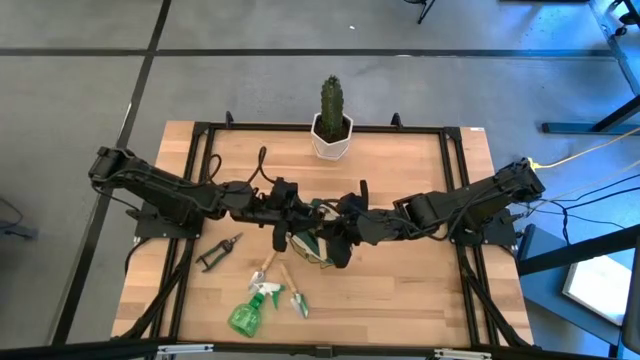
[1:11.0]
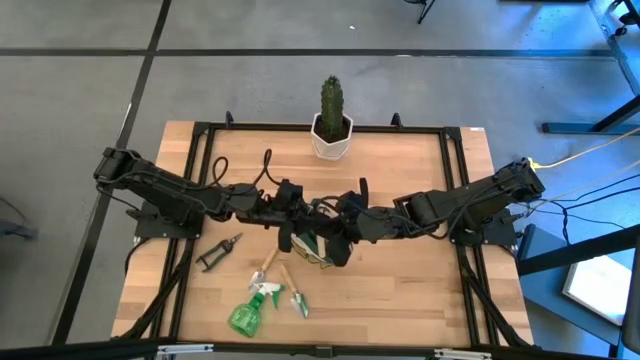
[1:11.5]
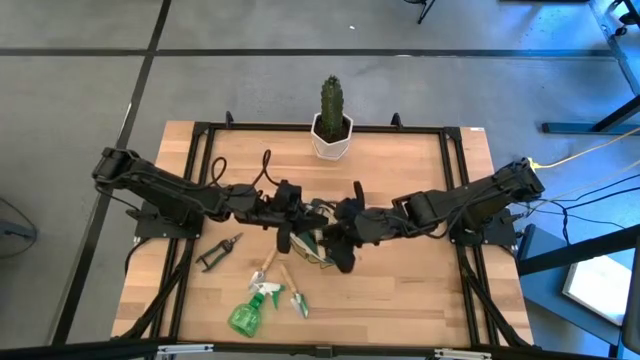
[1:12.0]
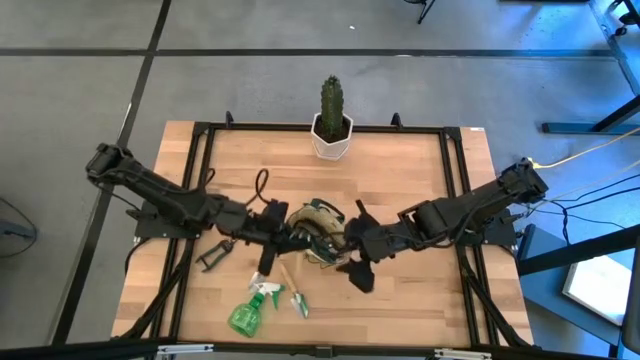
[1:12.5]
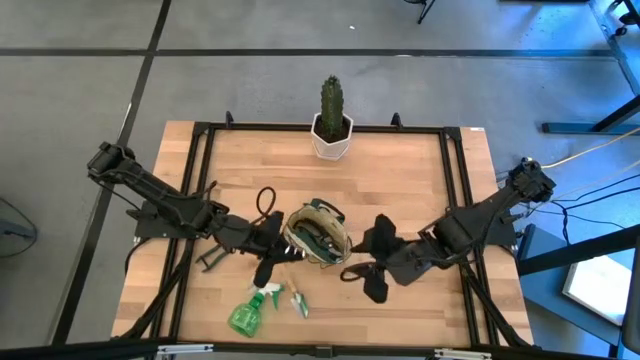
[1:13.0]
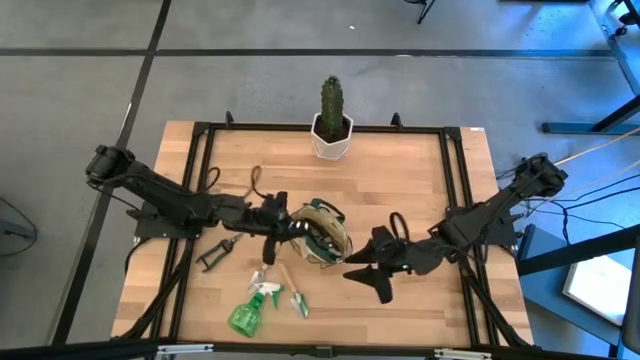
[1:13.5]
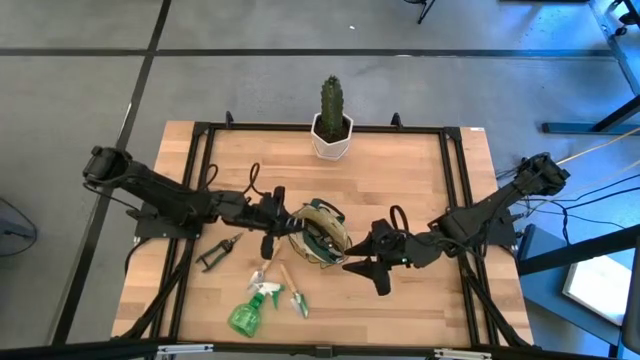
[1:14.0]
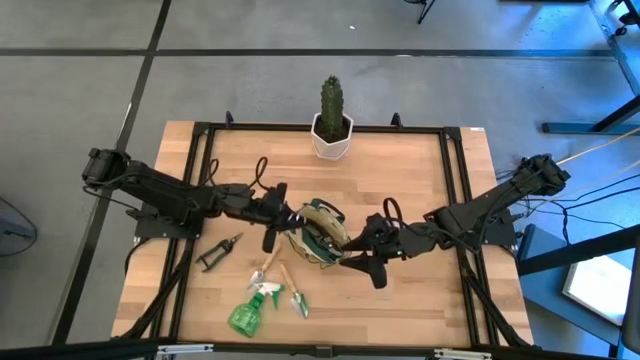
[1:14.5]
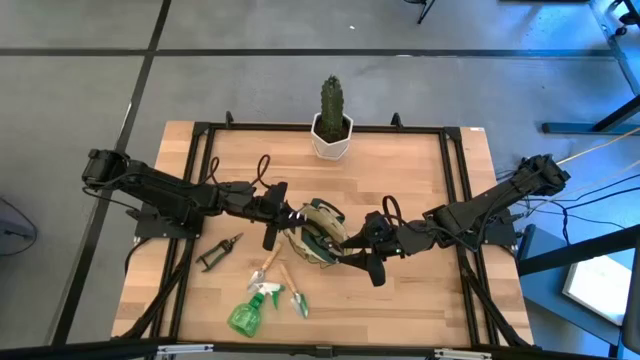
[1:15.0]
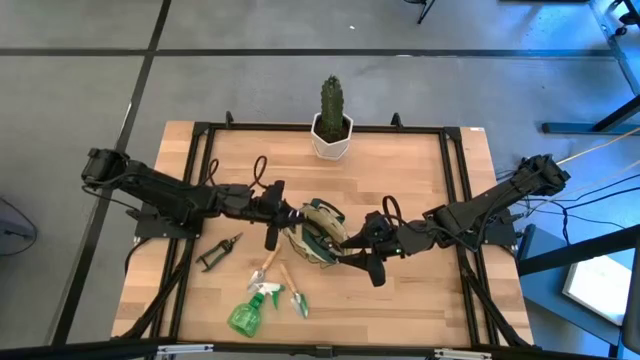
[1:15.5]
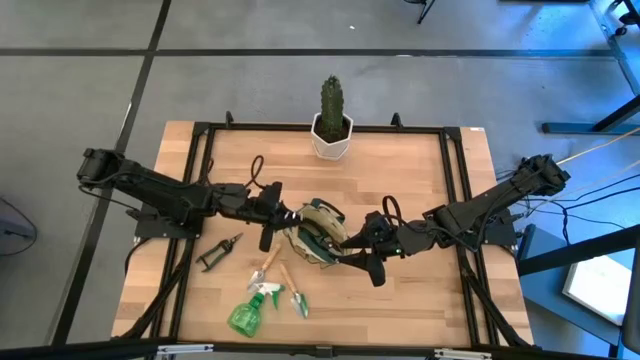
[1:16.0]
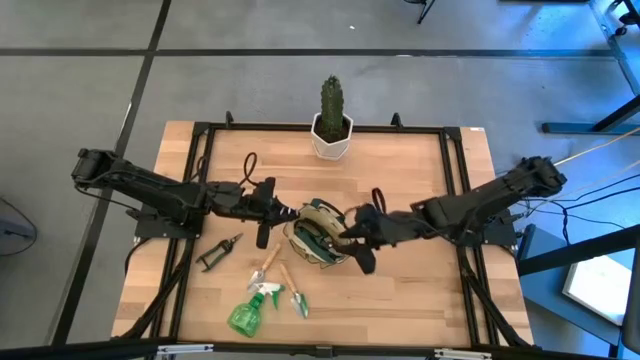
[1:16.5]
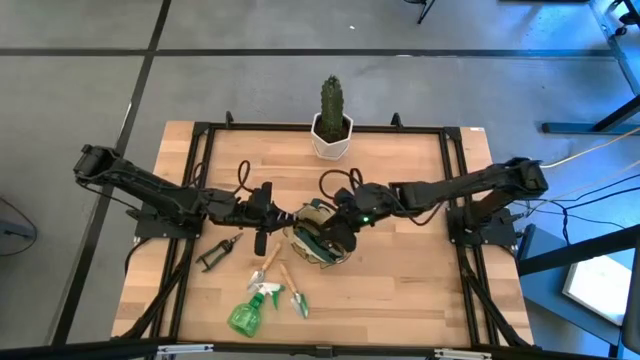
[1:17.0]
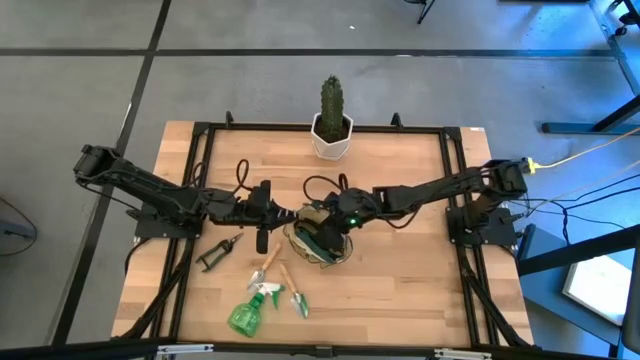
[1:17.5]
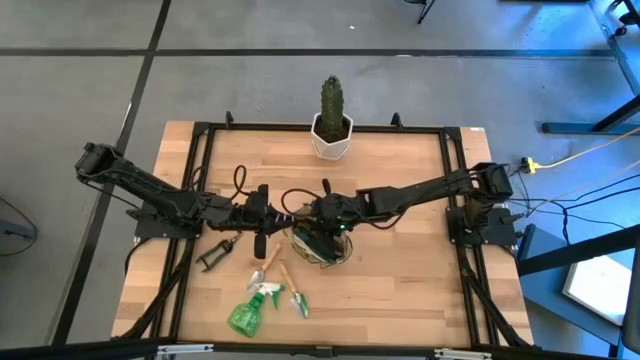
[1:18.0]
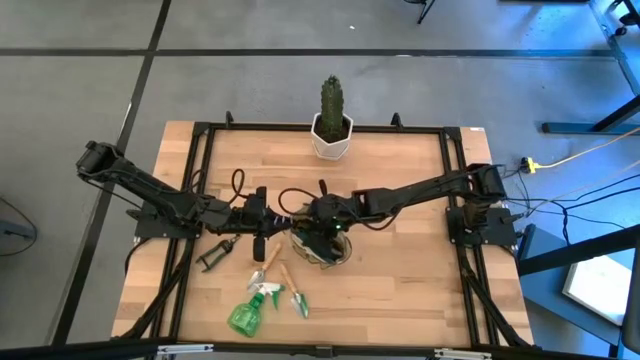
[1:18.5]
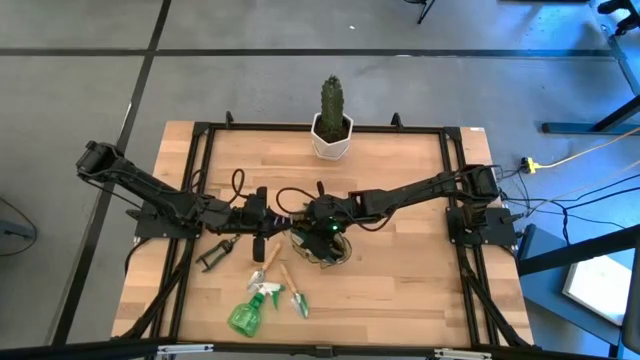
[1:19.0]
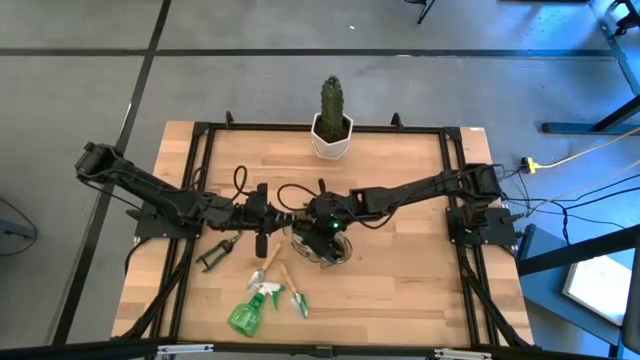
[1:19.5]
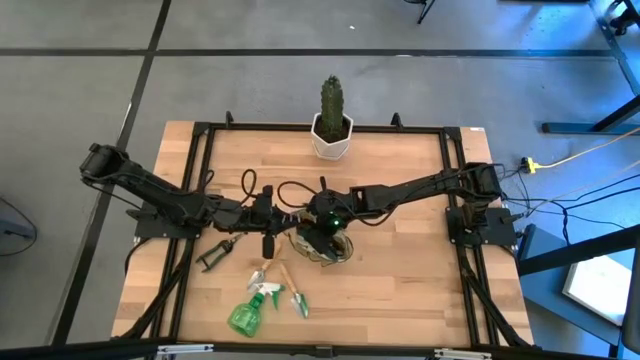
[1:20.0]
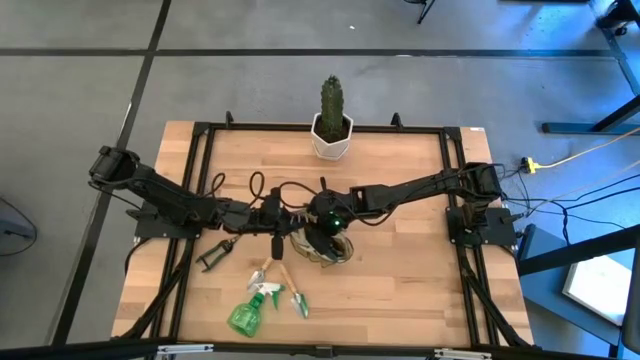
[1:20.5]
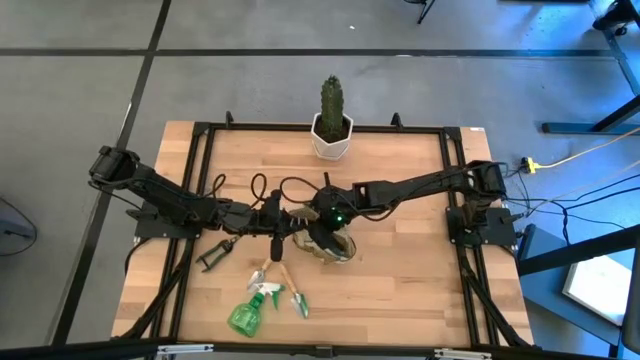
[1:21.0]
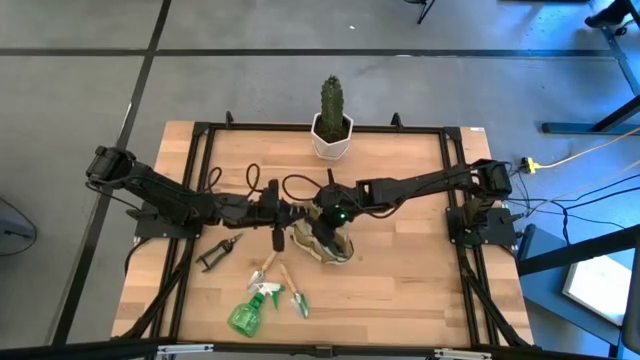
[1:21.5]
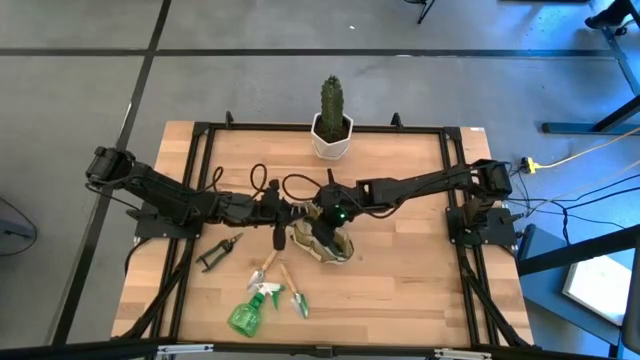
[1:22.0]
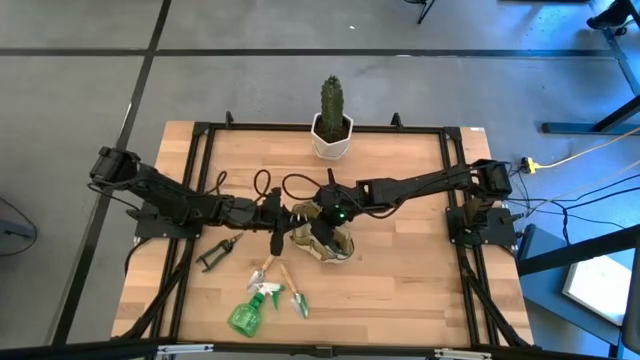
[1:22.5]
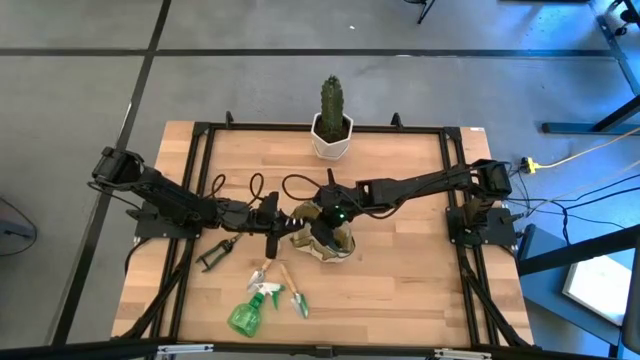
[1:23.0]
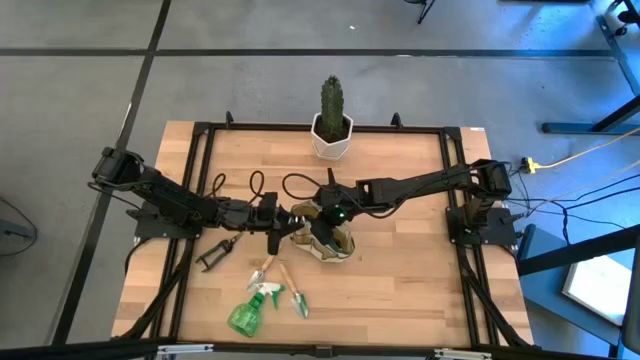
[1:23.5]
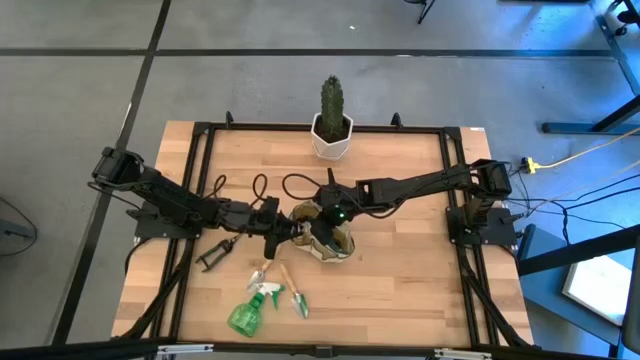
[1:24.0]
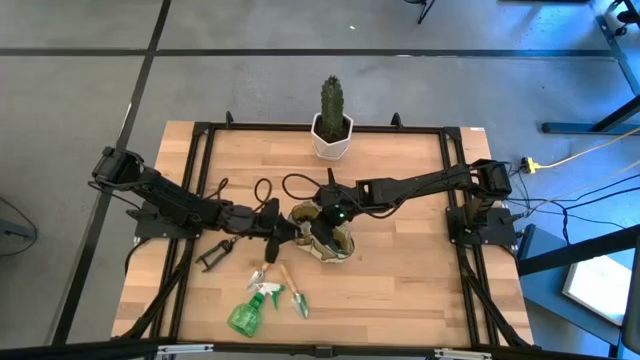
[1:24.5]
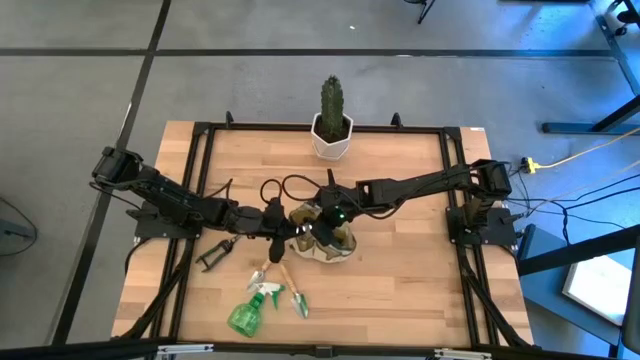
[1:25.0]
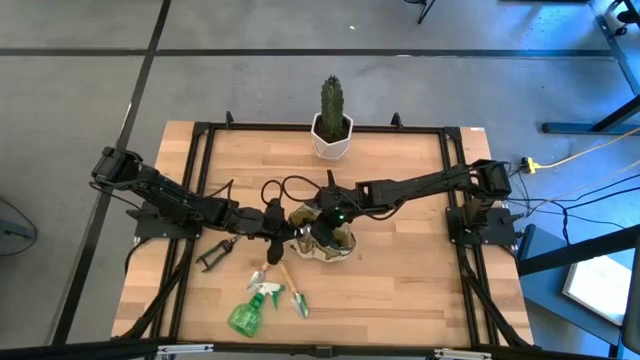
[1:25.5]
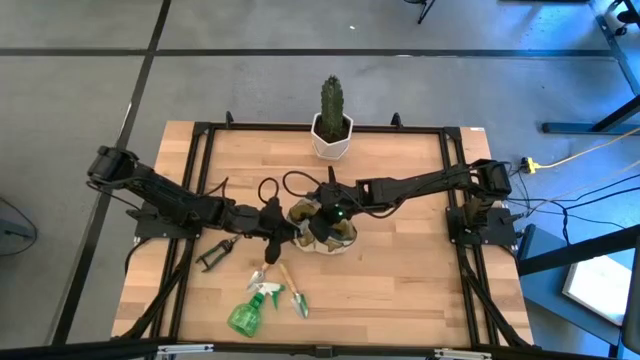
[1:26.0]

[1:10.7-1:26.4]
Task: Pick & Place Garden tools in Gardening bag
Put the brown hand rake into the green gardening bag

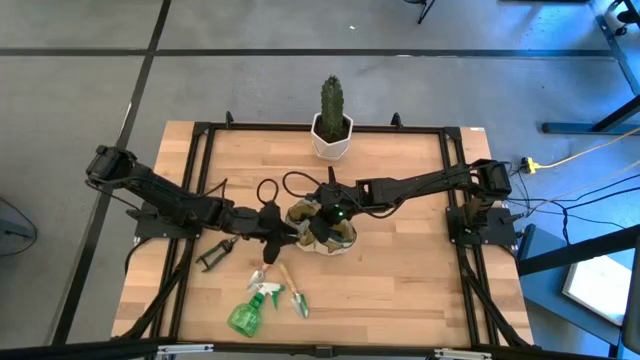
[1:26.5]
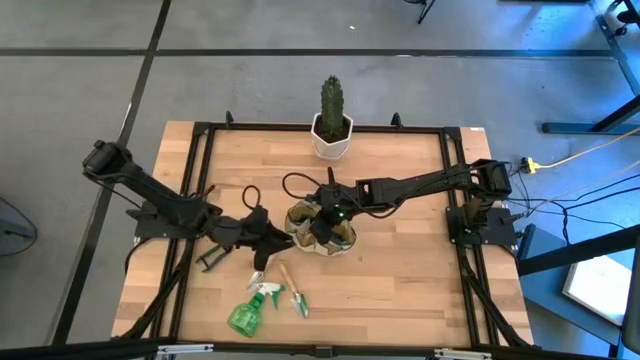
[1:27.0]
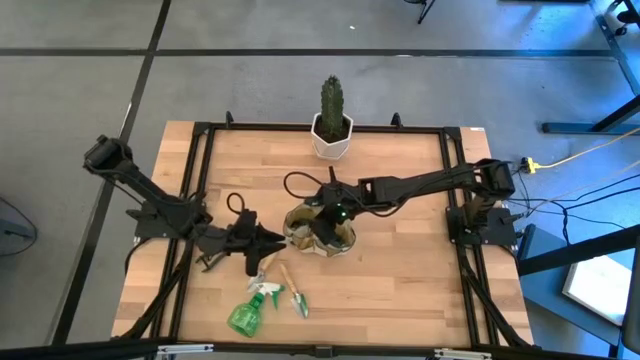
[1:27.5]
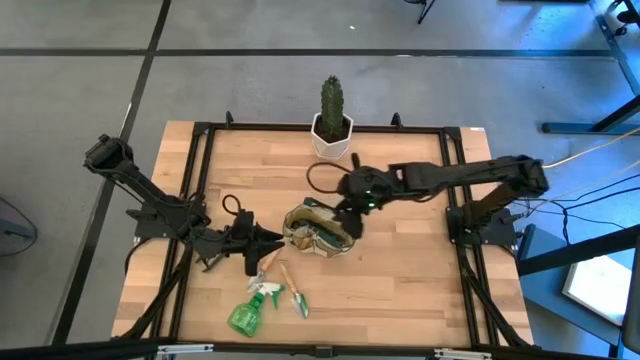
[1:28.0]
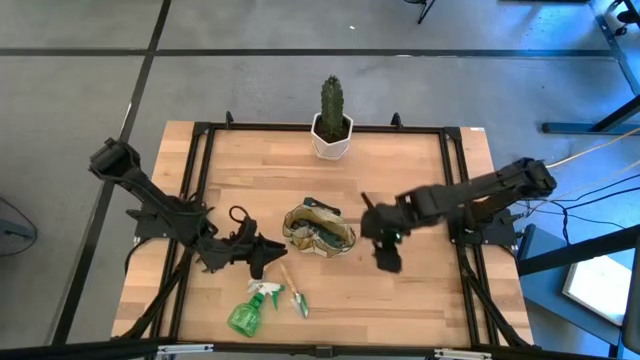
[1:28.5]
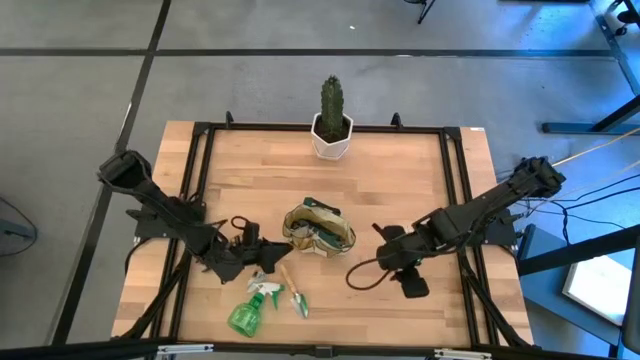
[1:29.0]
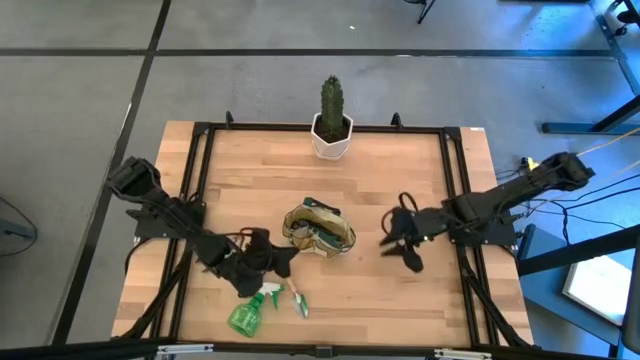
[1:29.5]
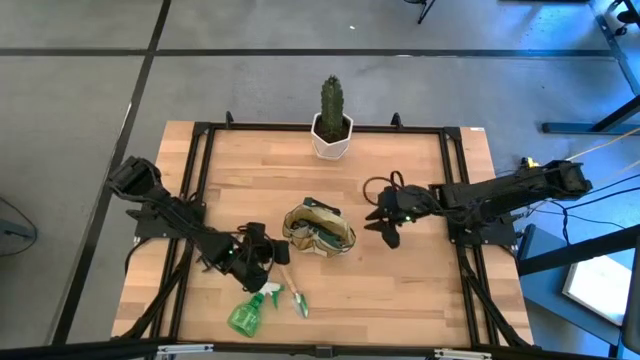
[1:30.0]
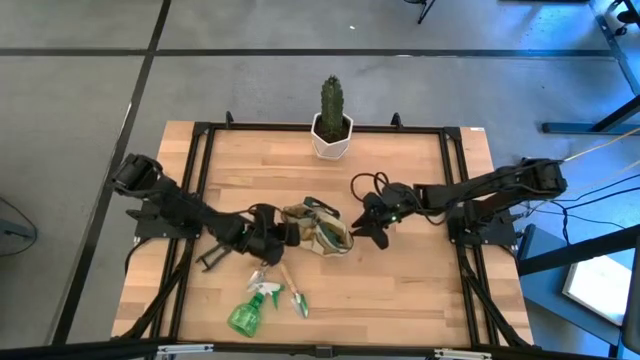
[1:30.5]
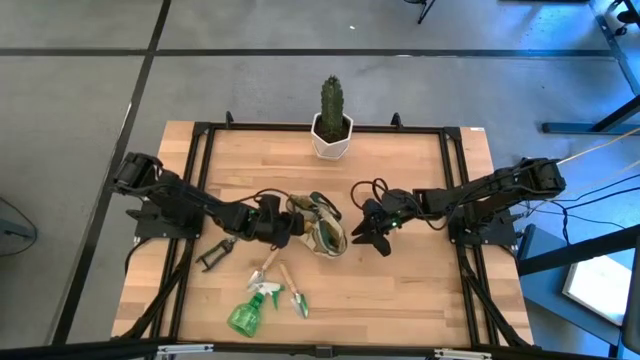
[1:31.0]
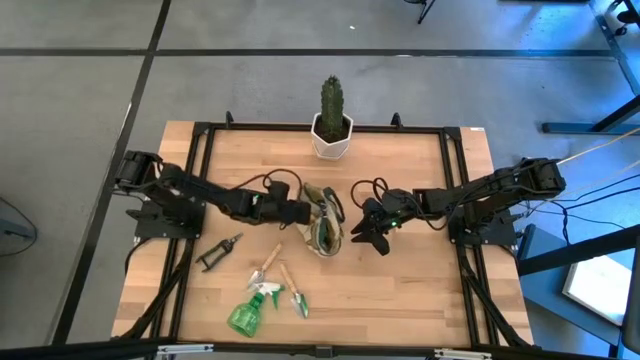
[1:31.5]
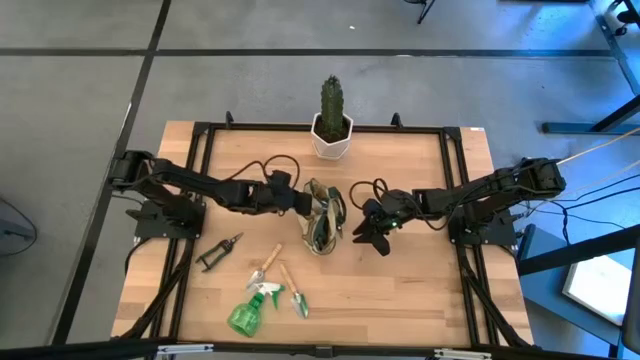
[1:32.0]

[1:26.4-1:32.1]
Adjust the green gardening bag
